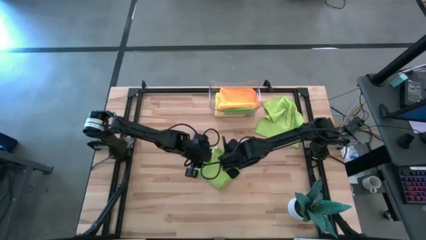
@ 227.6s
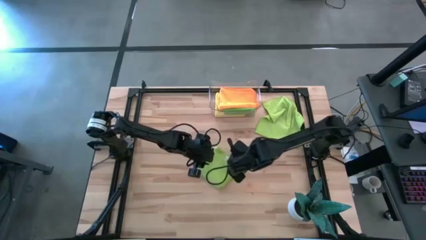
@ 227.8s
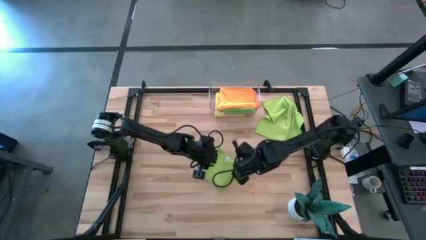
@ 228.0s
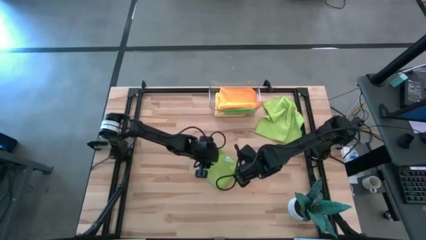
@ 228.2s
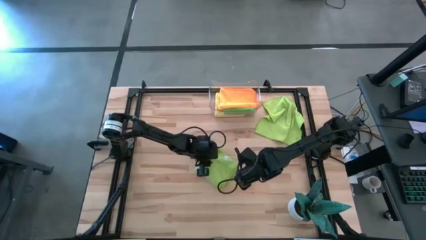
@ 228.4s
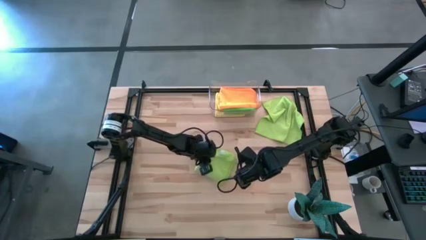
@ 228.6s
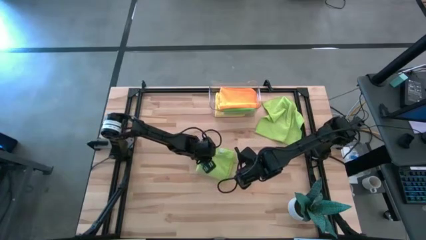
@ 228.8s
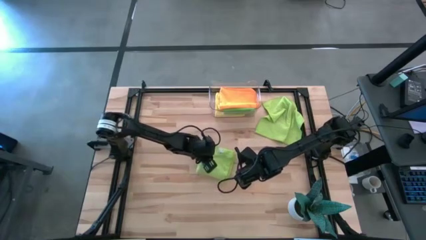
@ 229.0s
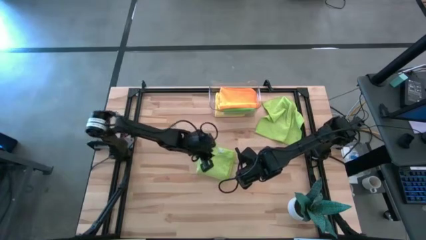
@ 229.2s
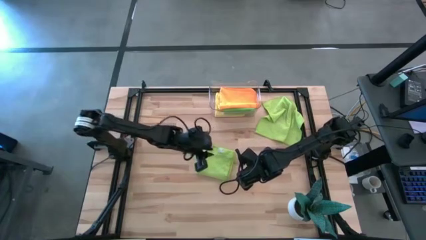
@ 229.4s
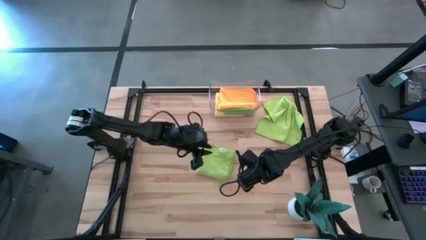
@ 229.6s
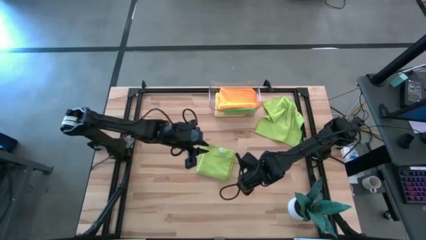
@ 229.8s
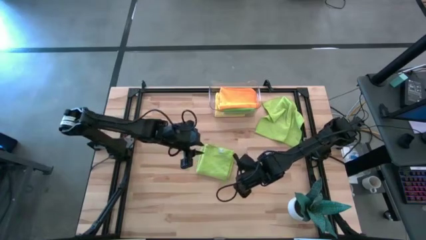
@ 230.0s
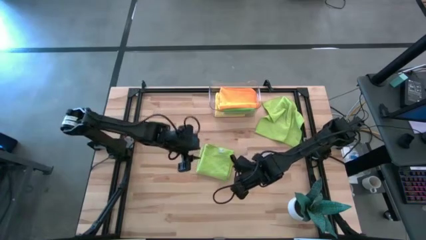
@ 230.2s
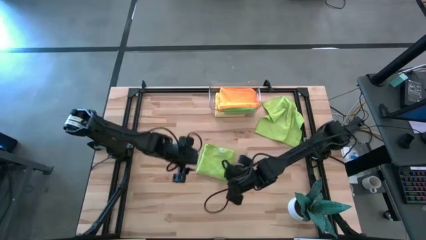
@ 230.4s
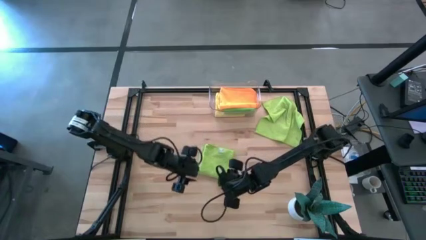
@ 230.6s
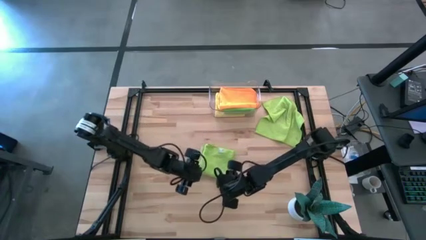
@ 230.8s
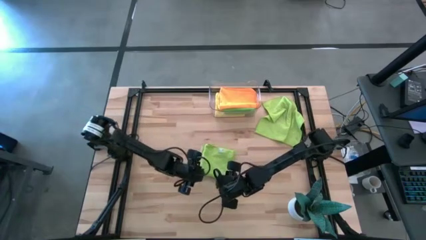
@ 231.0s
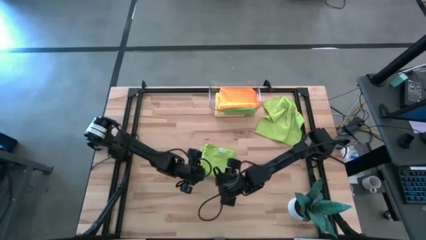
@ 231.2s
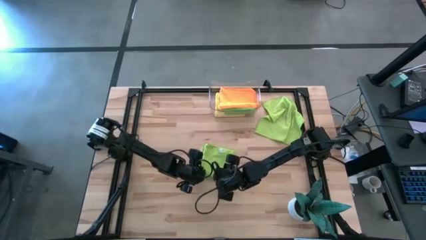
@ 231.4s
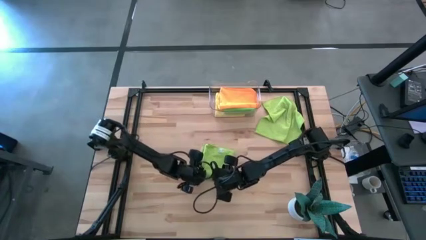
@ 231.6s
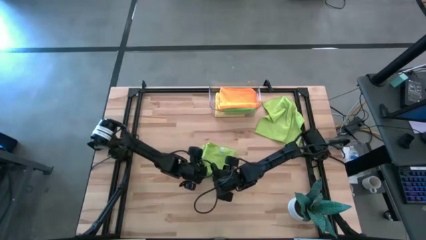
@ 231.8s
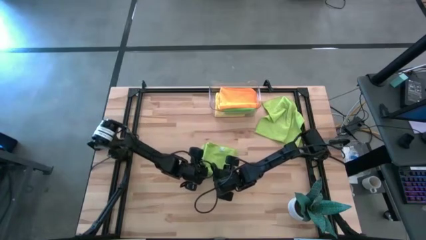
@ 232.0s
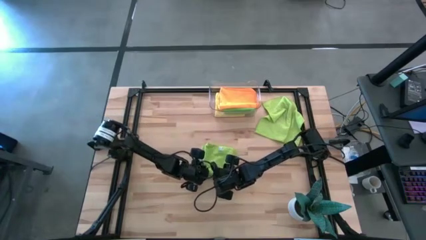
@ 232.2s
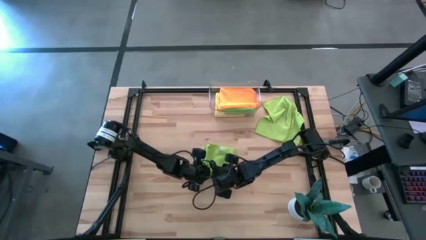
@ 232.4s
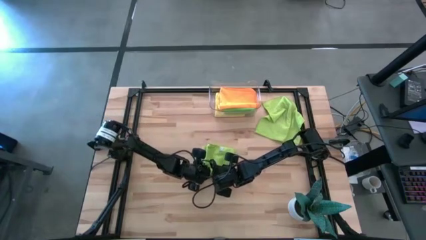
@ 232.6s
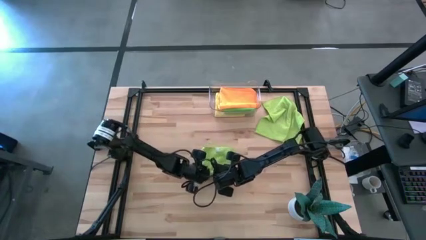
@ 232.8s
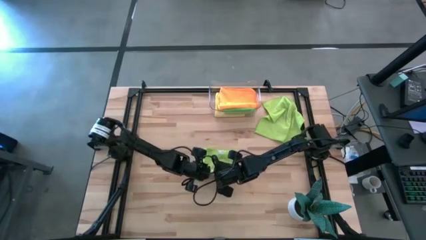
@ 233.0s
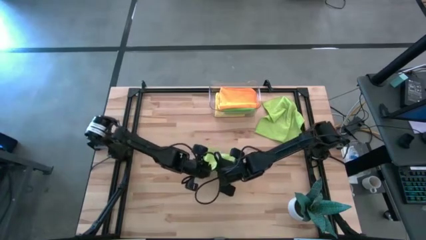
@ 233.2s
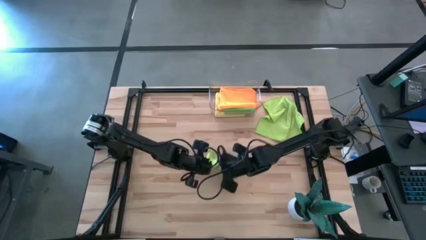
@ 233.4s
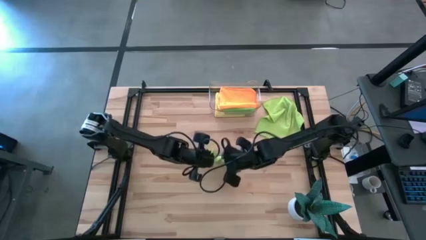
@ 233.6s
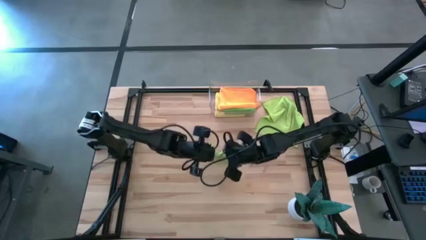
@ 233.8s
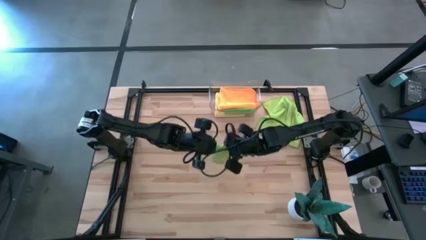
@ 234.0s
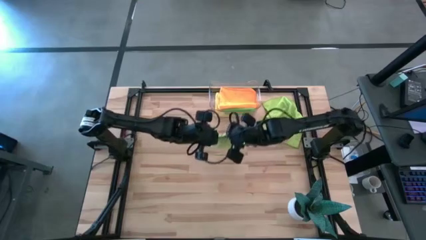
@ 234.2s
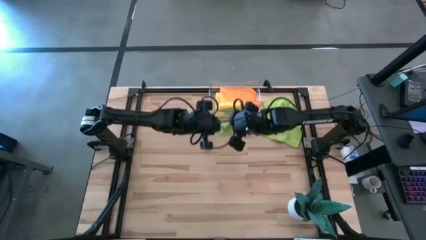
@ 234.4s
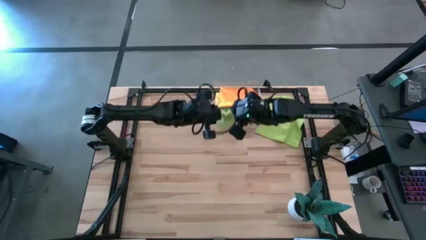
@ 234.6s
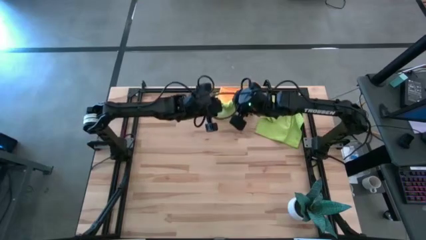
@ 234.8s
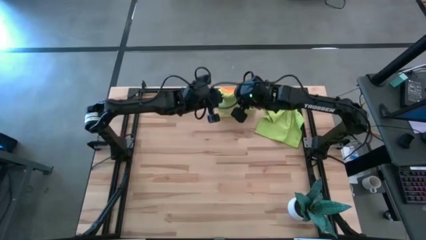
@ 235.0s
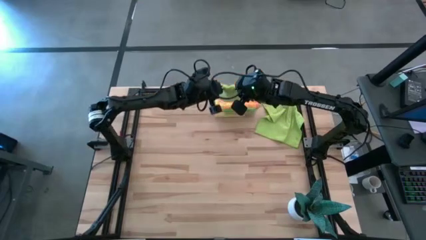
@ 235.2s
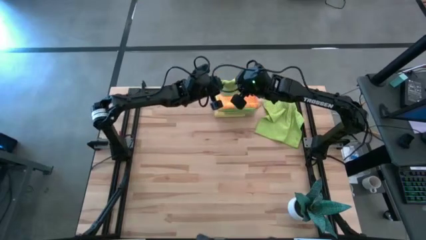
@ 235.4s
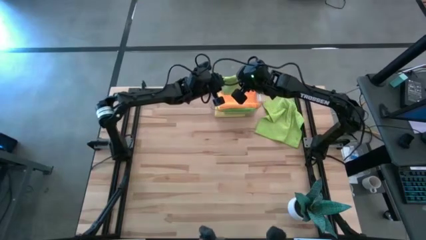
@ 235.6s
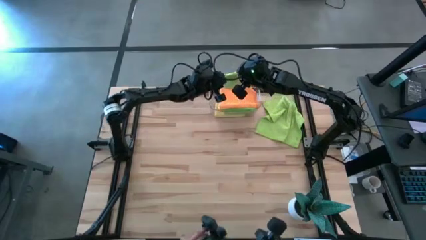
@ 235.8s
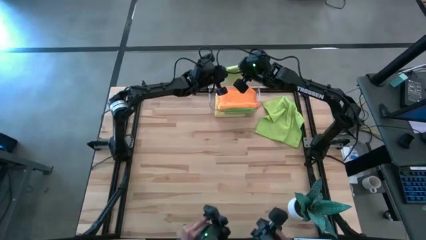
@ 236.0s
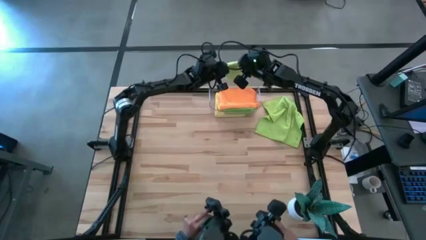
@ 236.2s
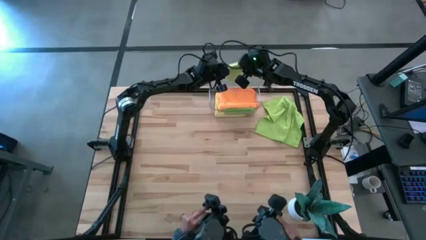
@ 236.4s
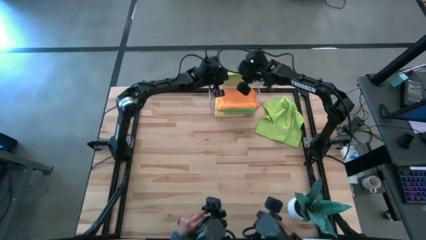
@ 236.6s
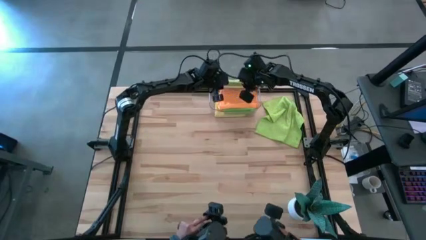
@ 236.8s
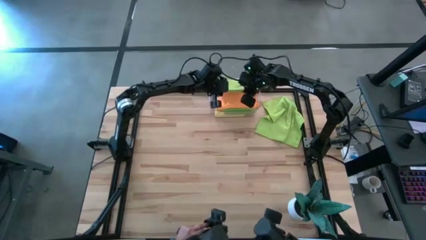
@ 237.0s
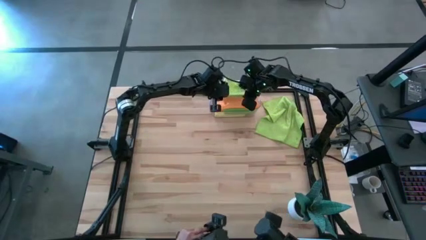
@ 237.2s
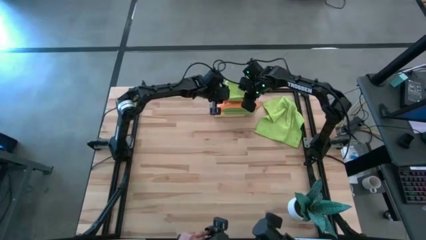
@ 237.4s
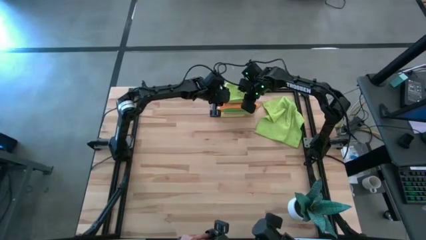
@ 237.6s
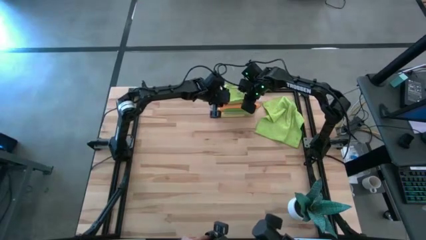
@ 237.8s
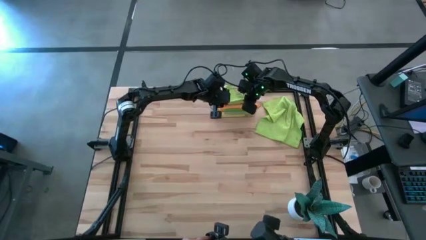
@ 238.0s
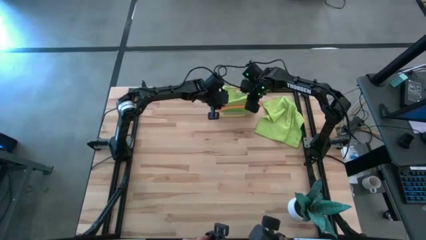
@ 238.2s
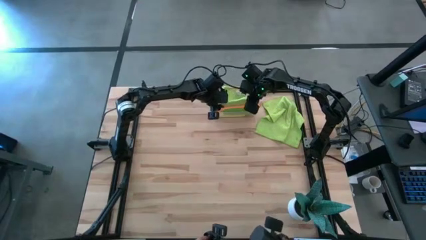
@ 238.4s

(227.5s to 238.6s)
Task: Fold microfiber towels
Put the light green microfiber cloth into the transparent bin

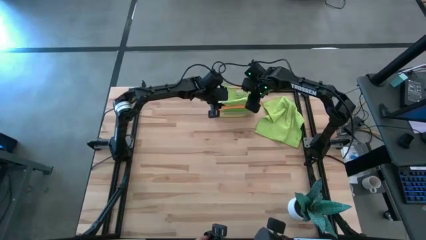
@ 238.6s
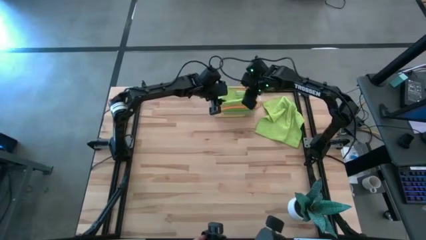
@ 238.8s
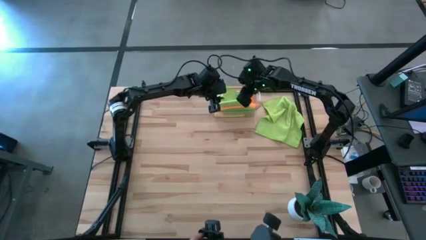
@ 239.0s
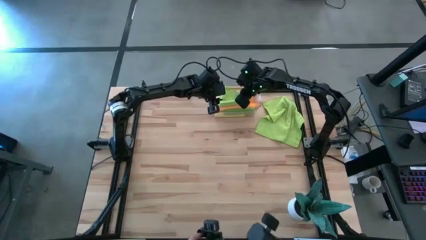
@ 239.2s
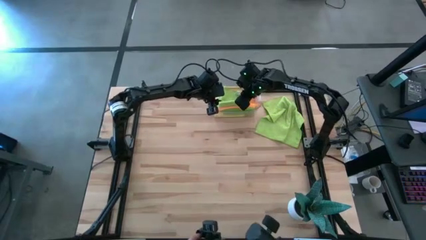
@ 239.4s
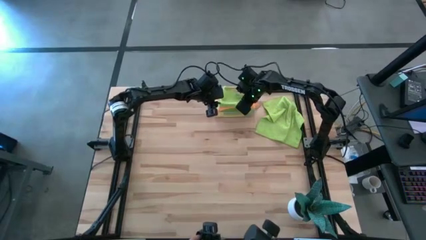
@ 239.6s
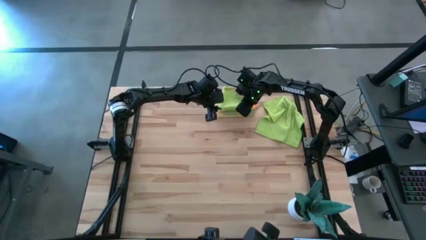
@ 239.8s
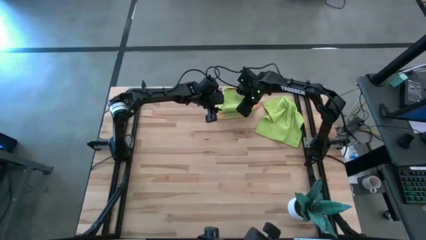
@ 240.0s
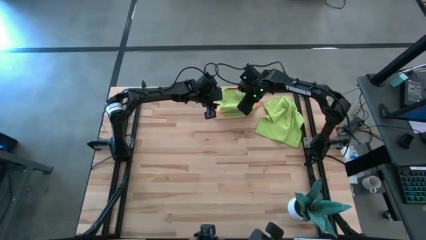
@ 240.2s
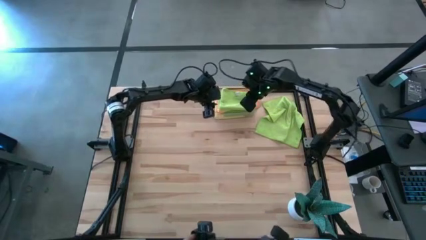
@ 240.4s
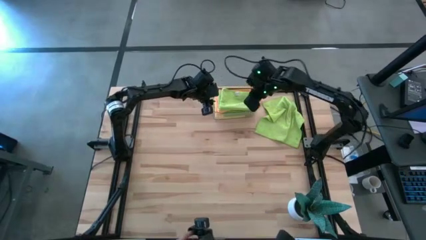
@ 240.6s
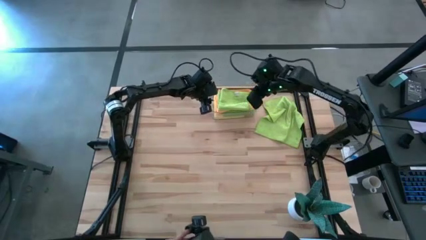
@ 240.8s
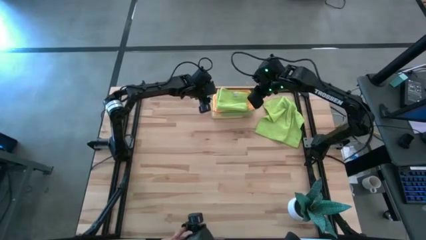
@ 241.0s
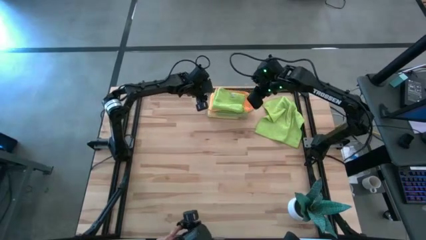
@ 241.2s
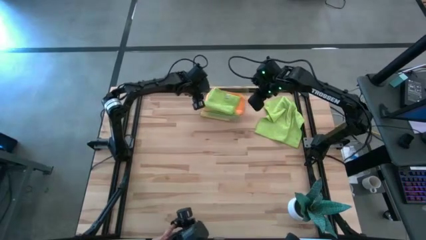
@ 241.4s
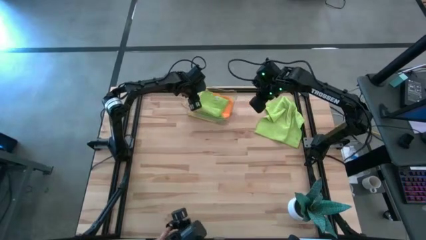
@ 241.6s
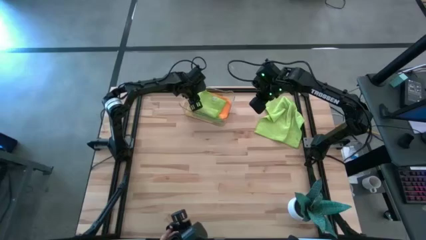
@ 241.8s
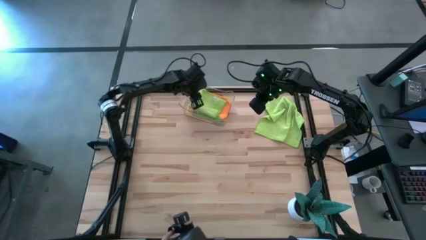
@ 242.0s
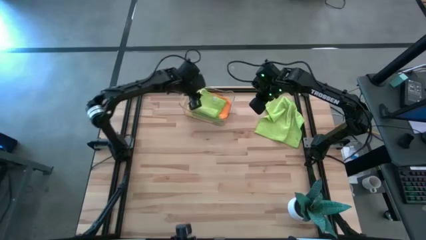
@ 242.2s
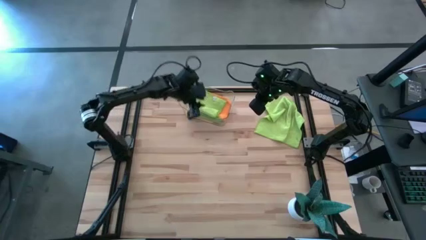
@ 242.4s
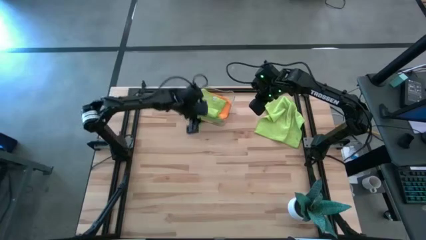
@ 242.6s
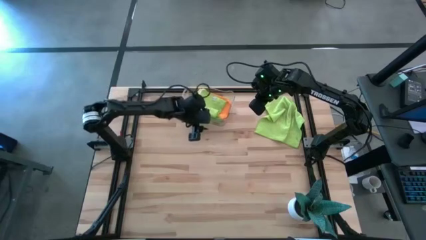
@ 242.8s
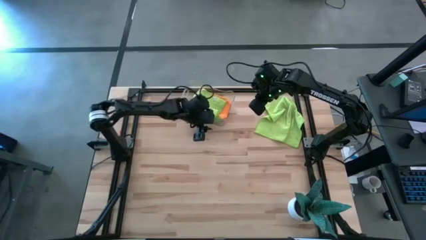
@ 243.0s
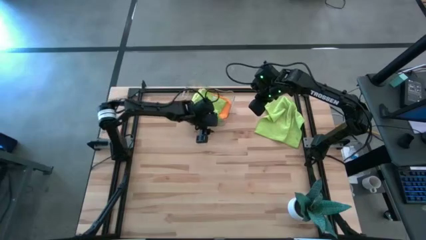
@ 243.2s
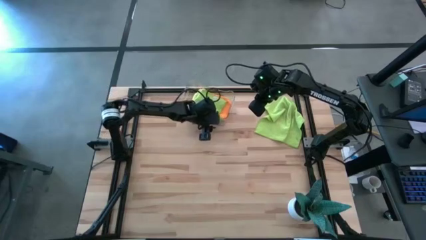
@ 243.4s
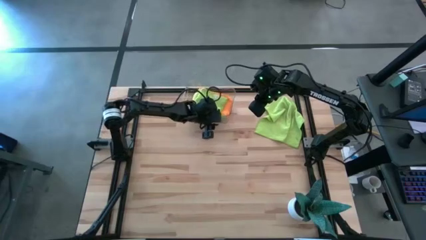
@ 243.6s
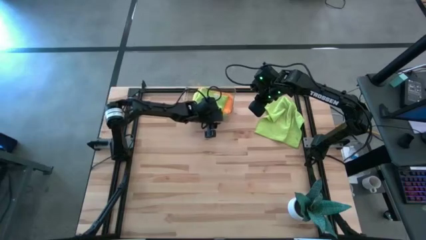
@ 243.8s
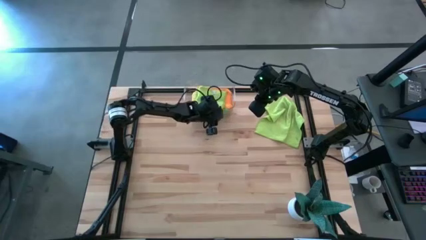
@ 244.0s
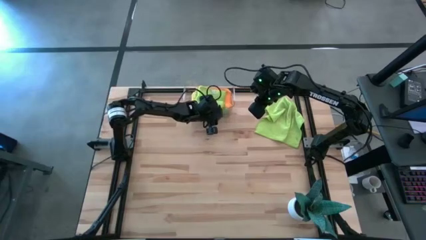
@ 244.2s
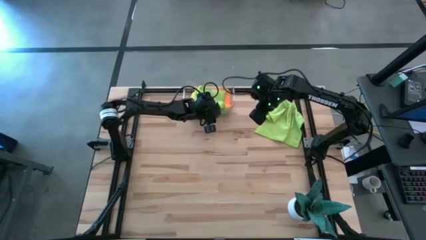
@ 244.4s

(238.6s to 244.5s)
Adjust the transparent bin
